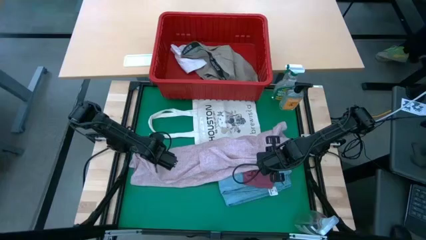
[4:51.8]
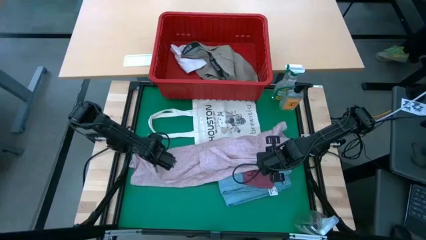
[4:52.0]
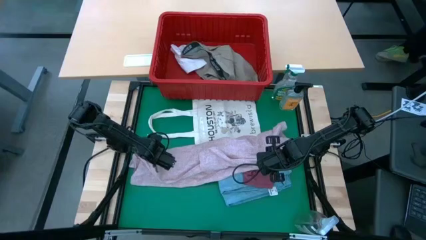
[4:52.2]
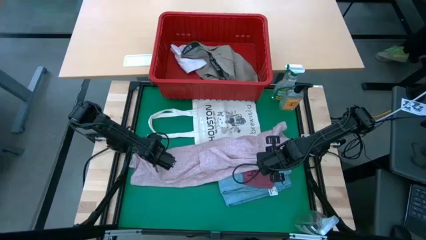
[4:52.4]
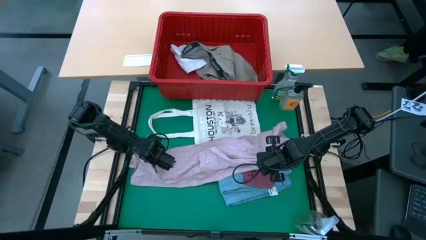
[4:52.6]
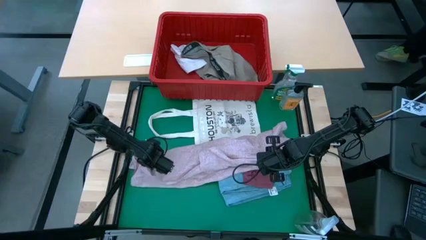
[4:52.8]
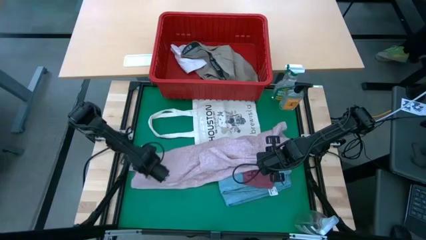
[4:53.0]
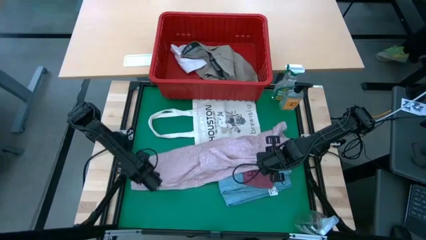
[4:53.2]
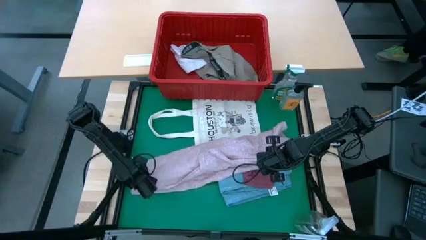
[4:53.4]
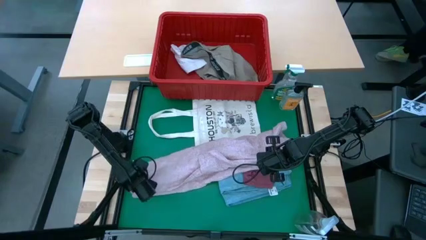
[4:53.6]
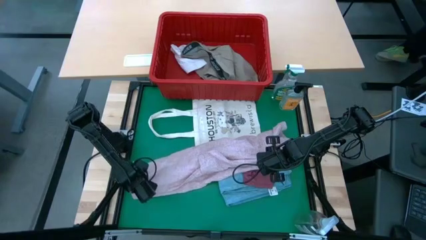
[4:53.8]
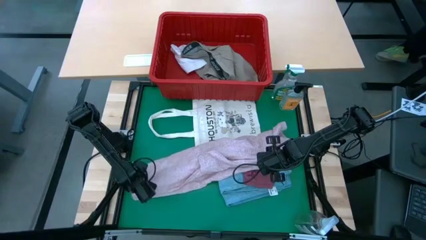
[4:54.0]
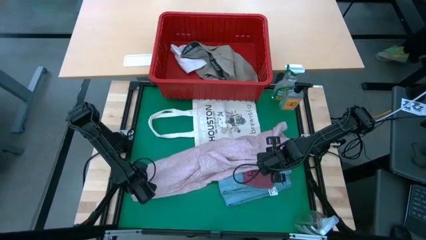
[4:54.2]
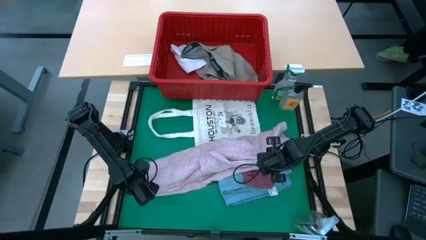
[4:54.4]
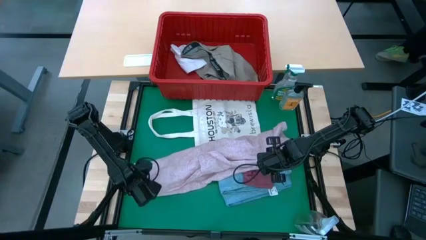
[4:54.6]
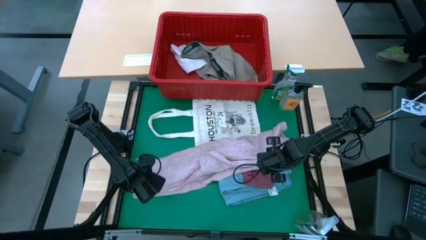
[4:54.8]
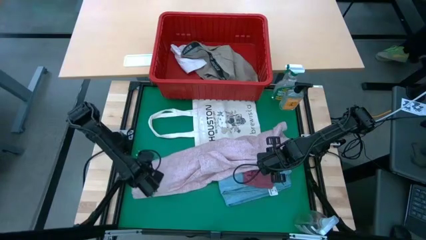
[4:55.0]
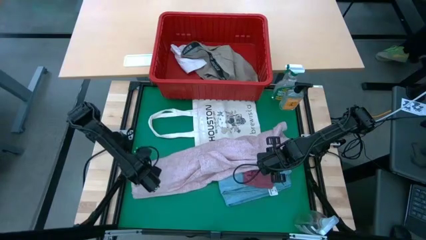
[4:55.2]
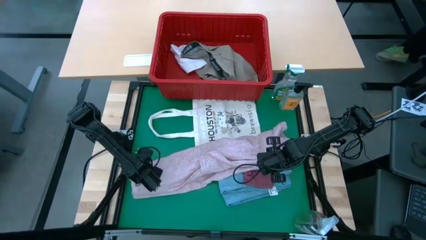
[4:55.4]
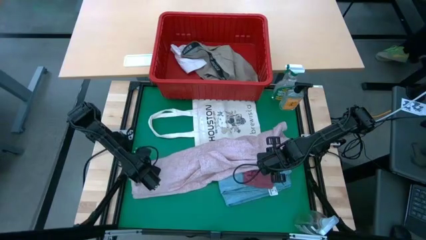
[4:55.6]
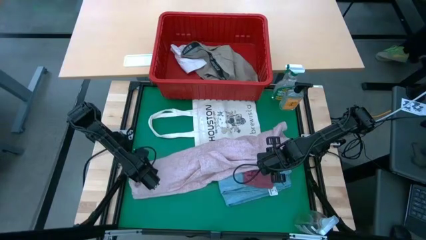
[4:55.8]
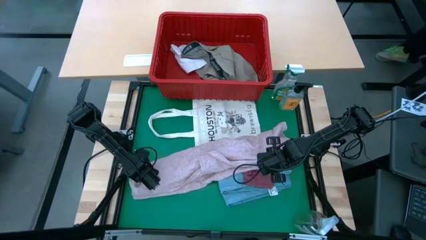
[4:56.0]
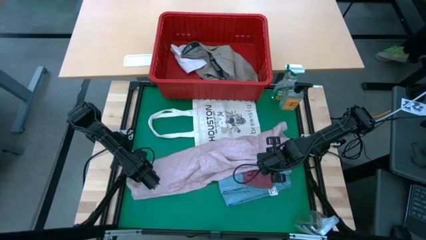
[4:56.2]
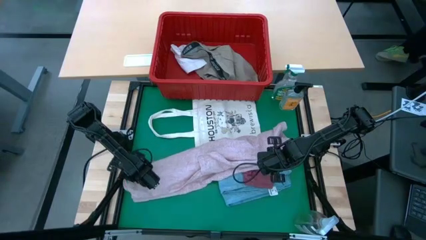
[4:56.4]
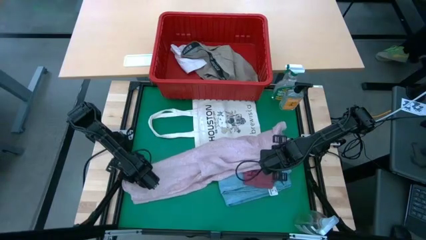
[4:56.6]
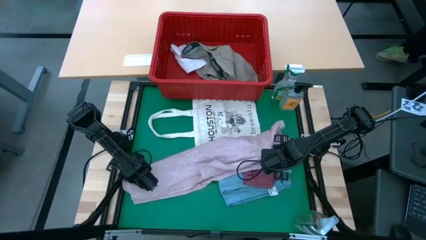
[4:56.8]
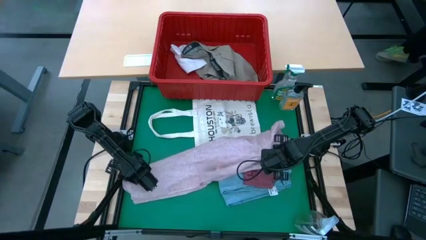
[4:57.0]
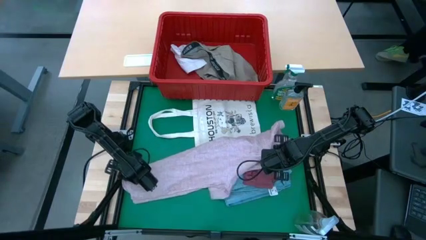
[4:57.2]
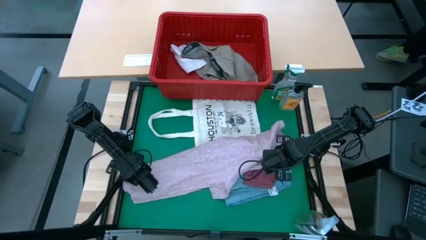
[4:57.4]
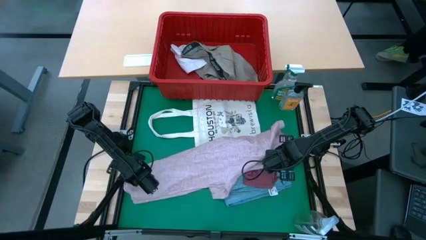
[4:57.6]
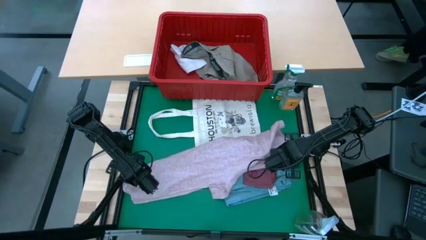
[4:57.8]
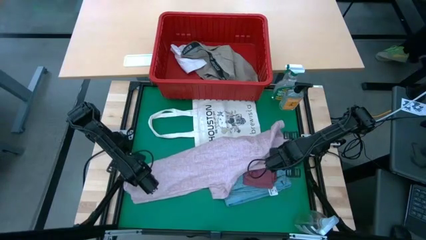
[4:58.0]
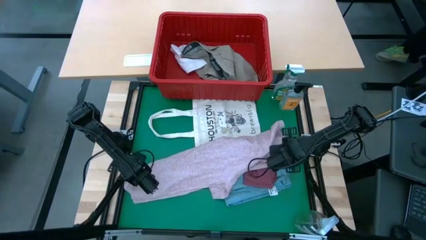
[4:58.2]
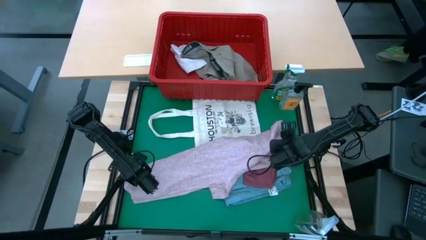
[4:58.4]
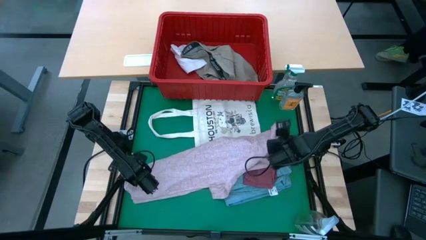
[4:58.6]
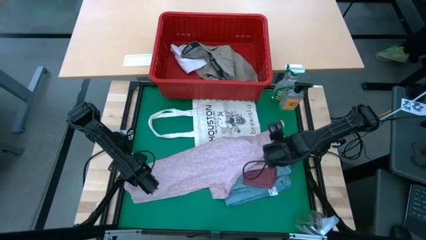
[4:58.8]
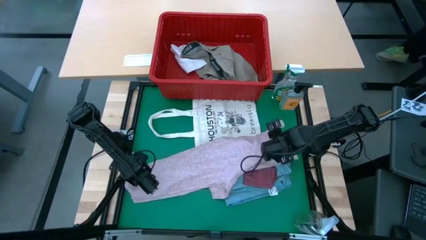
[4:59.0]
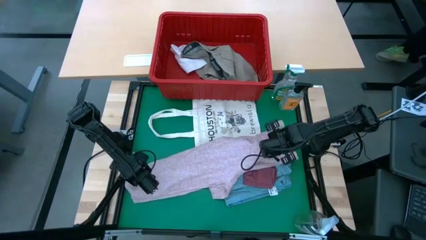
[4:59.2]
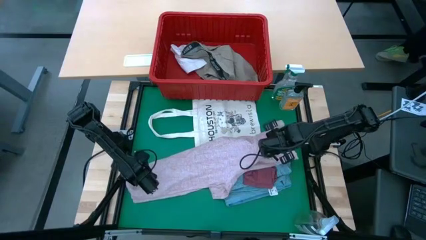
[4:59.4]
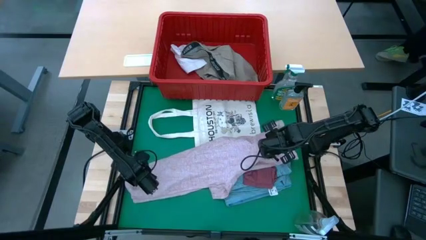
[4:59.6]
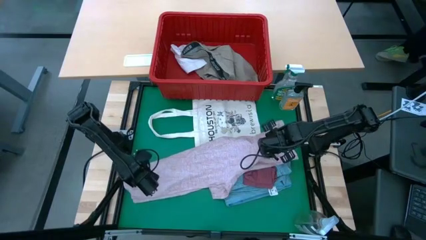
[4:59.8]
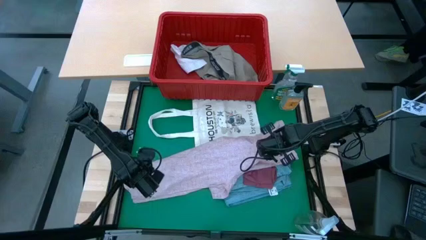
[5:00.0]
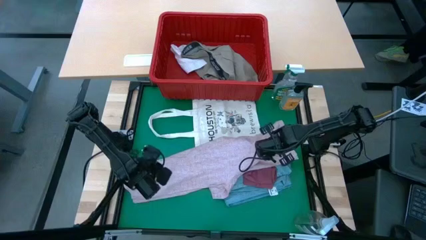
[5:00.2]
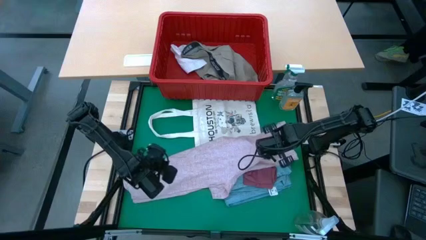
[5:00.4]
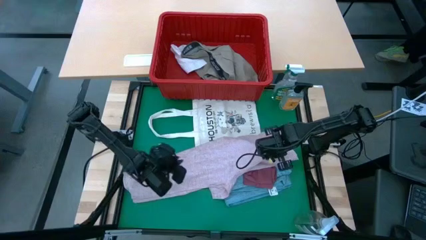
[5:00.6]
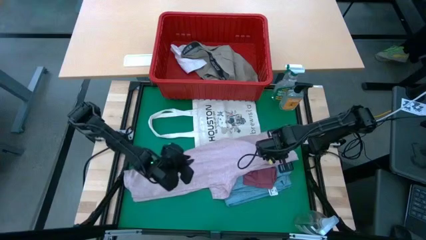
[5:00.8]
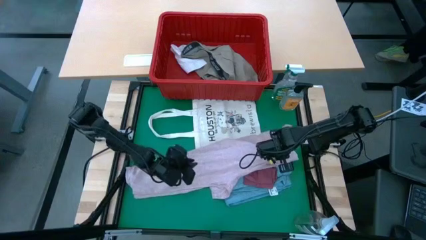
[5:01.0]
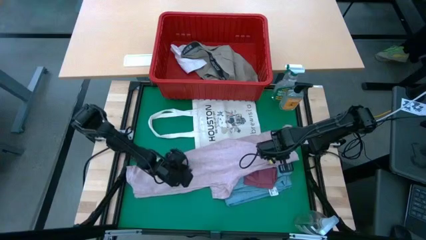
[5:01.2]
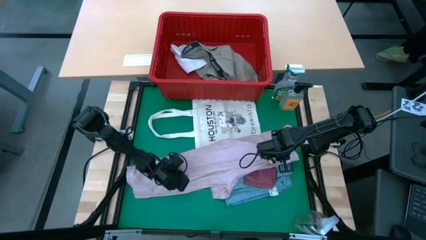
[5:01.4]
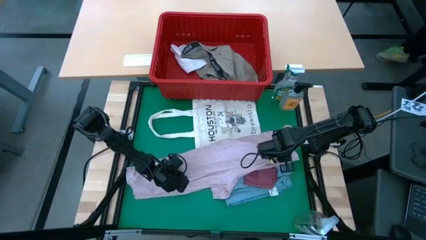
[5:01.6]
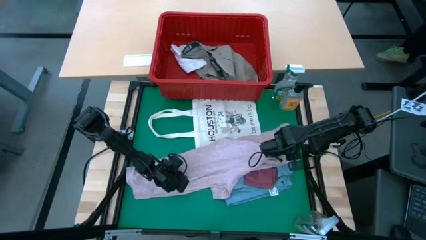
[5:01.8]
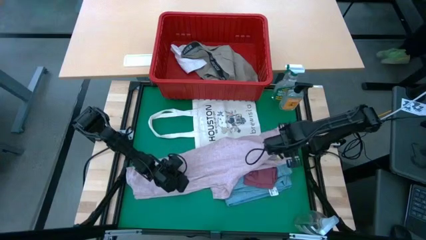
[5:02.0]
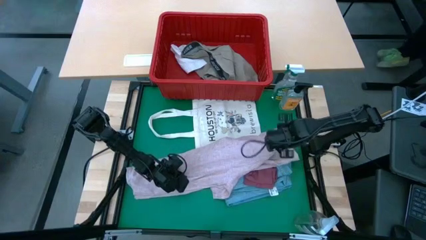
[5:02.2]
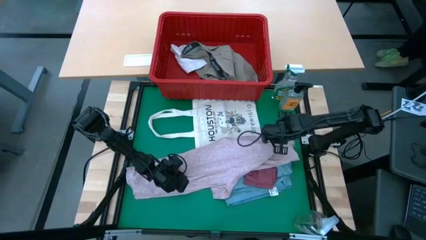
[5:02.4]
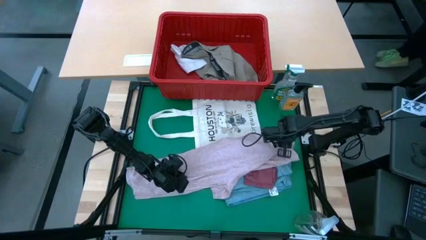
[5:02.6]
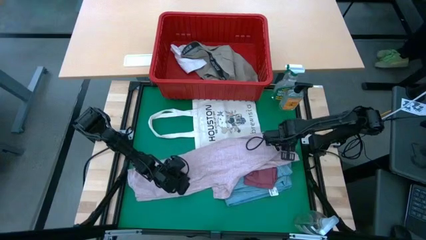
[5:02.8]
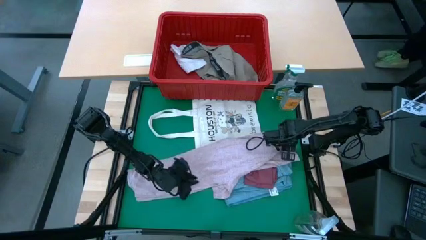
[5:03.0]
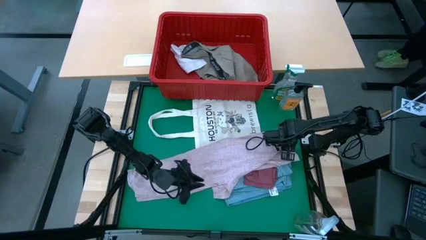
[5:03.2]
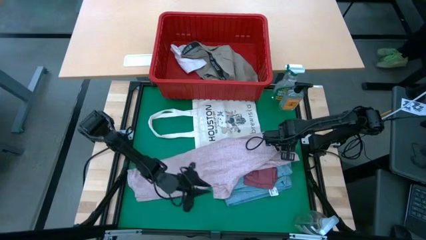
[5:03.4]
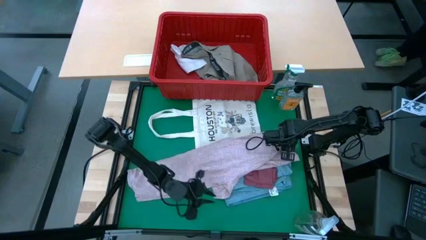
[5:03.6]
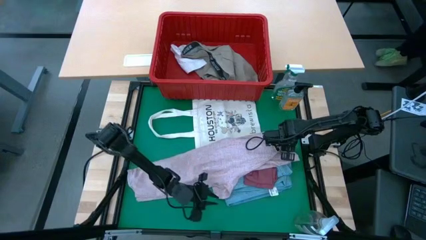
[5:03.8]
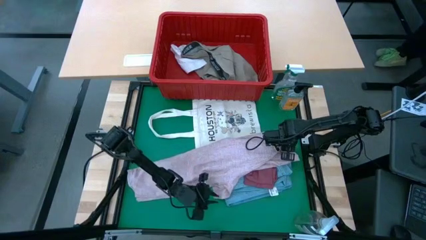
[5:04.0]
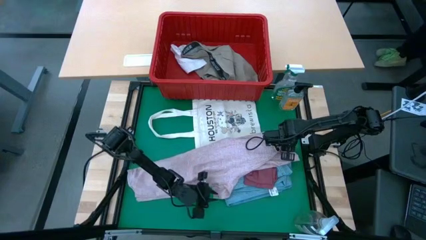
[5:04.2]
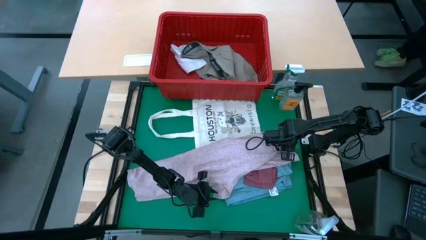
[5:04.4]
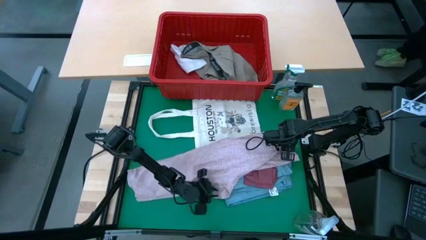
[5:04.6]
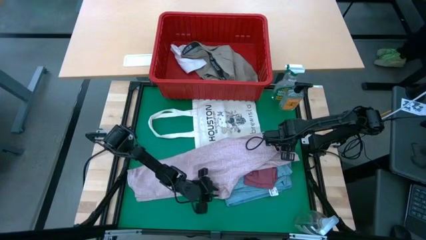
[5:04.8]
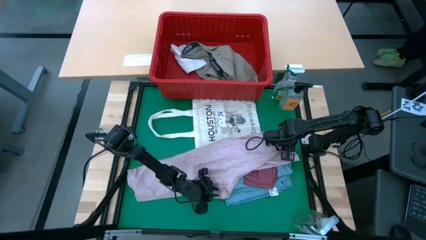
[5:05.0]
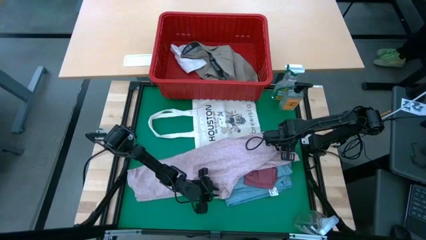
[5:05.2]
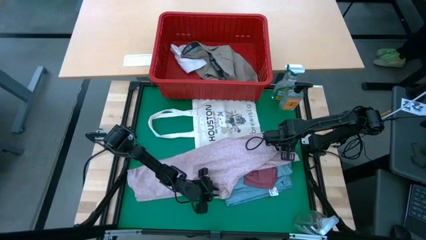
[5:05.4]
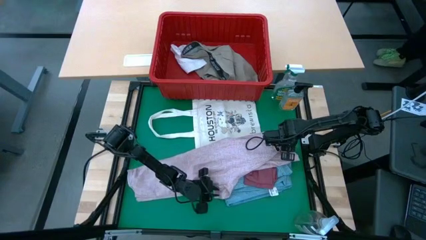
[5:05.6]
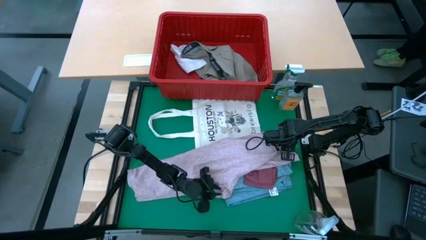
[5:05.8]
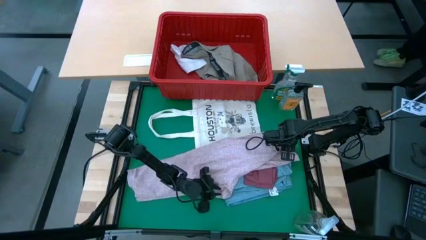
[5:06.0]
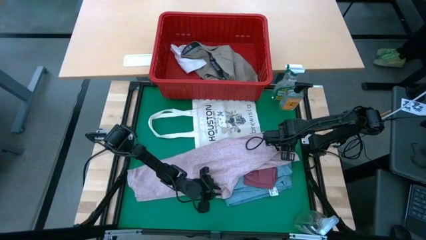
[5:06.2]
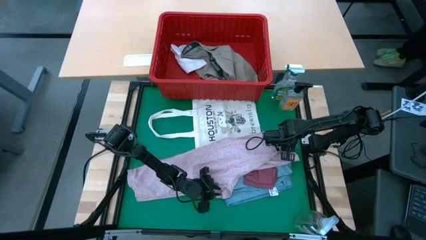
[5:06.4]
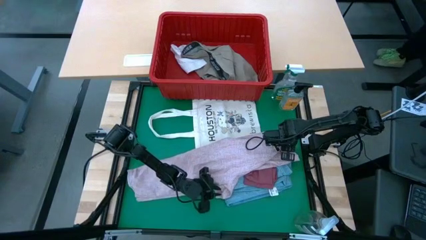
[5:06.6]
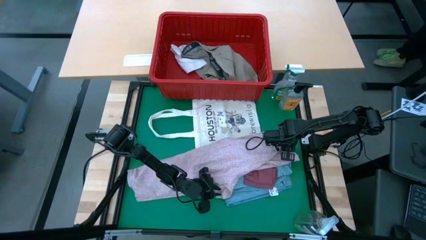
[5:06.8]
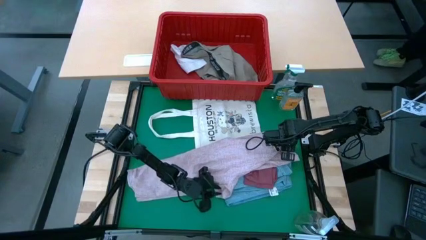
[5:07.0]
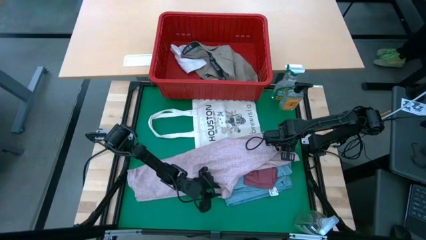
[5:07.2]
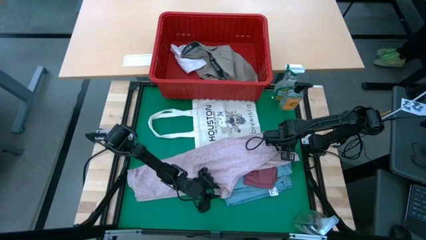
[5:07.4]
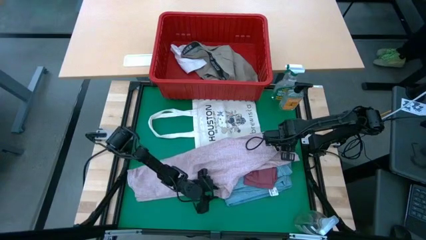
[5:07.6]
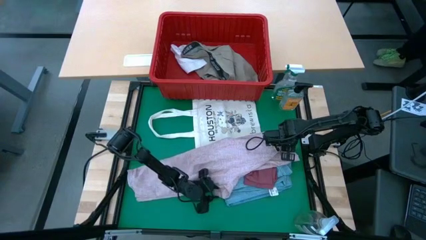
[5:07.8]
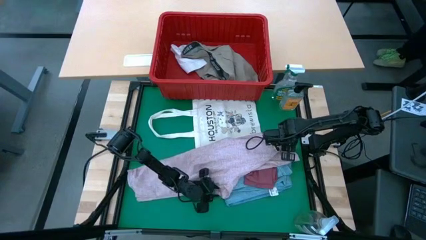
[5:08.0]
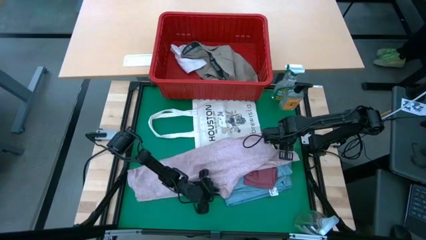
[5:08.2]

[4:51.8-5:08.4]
Task: Fold Laundry from Bin
Fold the pink shirt from the red laundry basket
